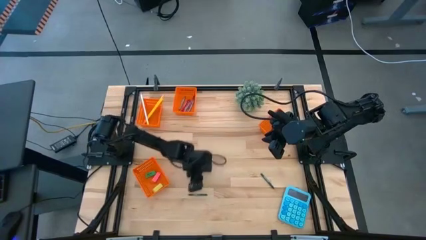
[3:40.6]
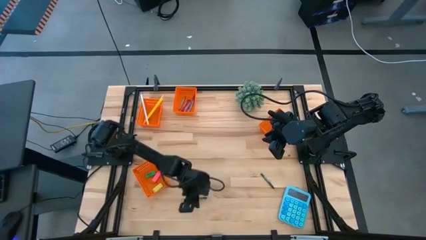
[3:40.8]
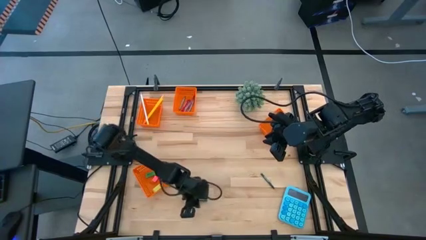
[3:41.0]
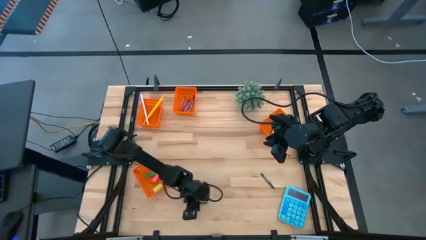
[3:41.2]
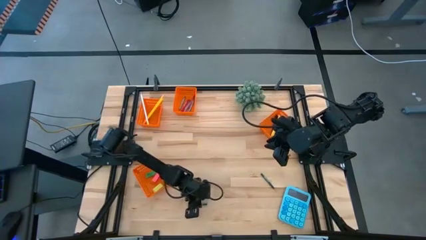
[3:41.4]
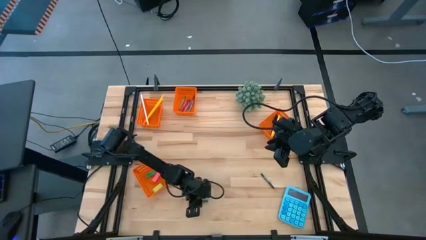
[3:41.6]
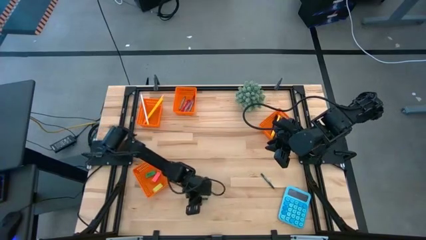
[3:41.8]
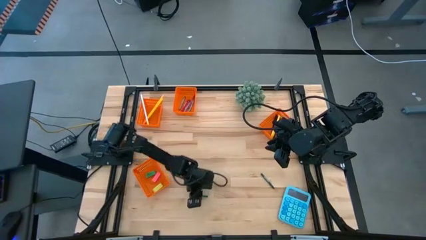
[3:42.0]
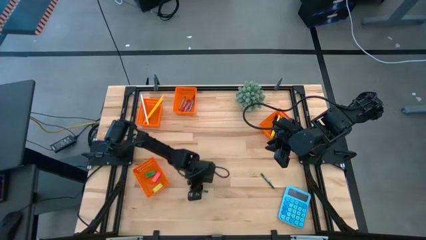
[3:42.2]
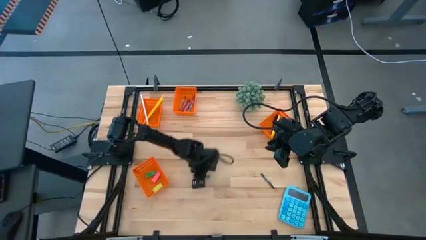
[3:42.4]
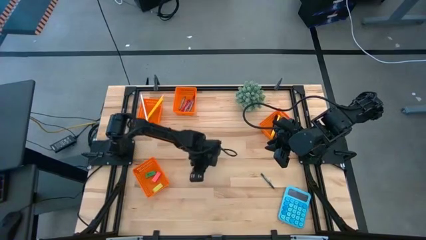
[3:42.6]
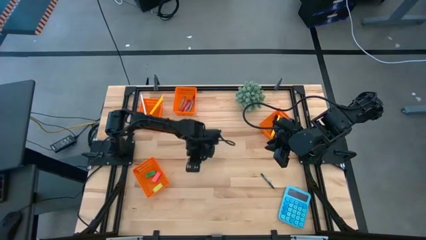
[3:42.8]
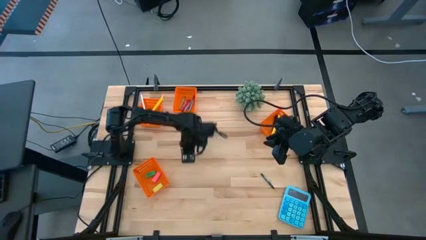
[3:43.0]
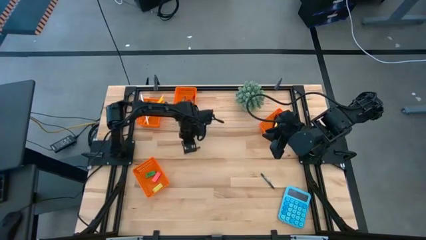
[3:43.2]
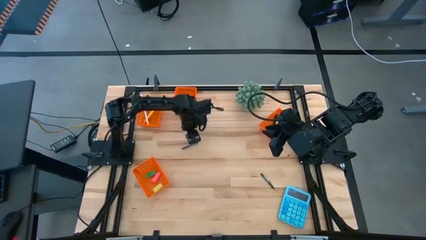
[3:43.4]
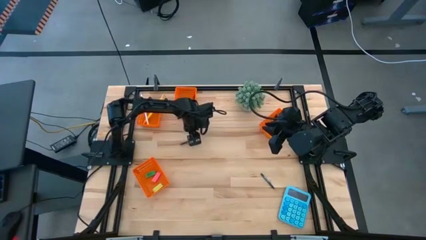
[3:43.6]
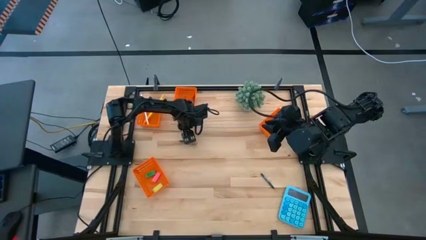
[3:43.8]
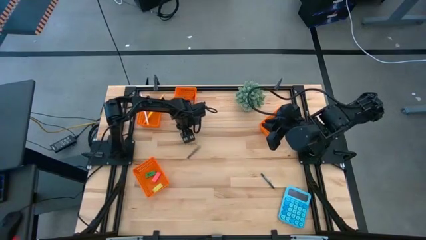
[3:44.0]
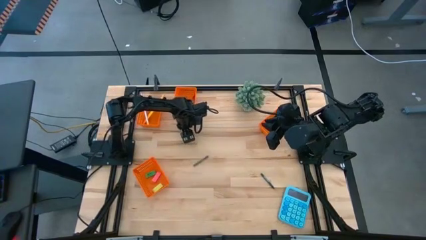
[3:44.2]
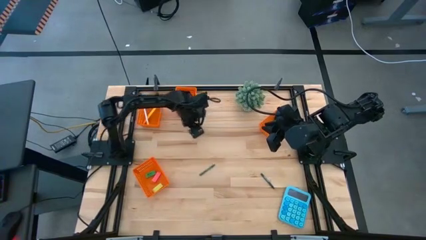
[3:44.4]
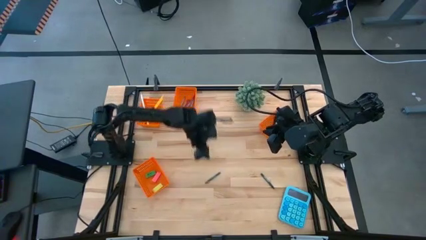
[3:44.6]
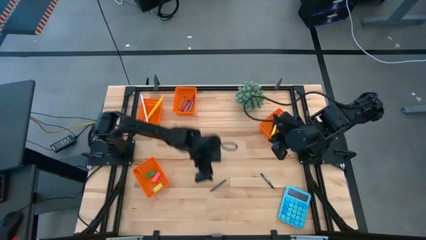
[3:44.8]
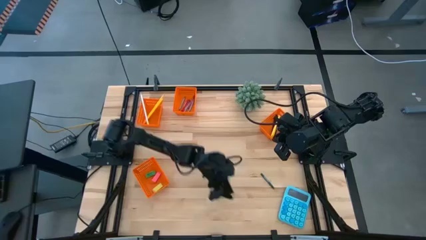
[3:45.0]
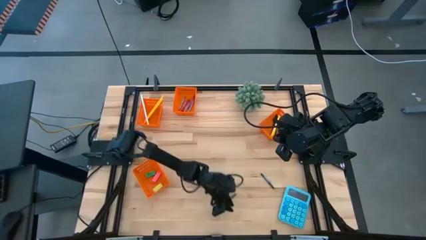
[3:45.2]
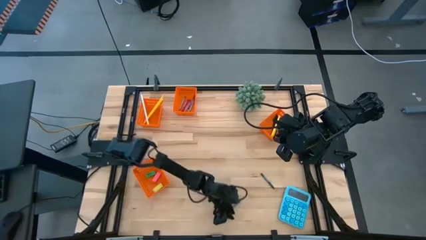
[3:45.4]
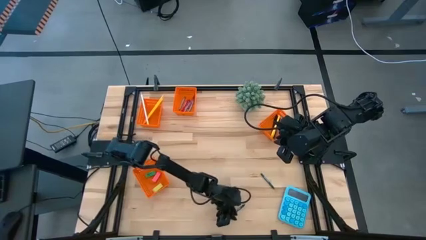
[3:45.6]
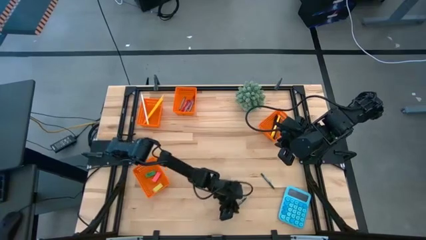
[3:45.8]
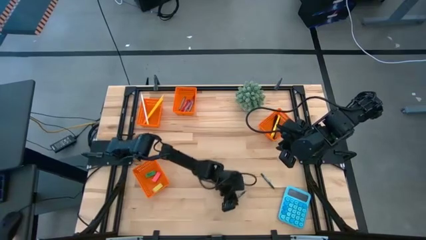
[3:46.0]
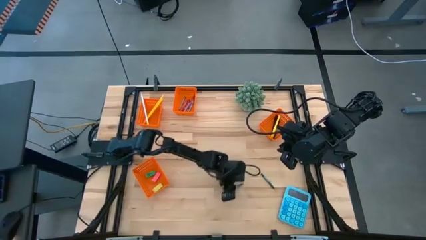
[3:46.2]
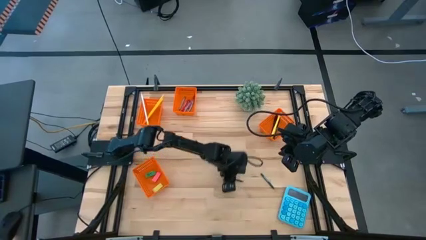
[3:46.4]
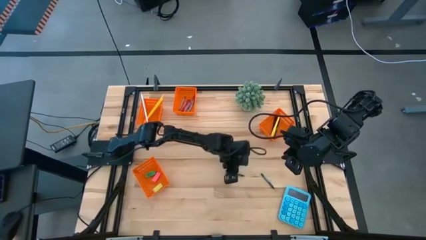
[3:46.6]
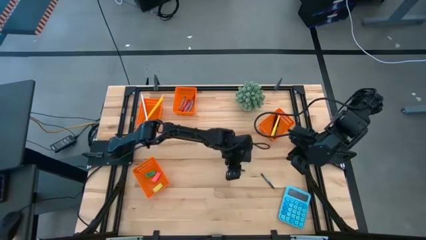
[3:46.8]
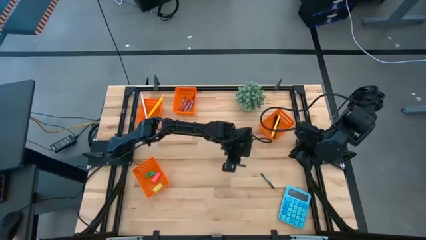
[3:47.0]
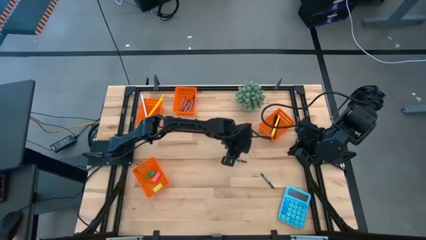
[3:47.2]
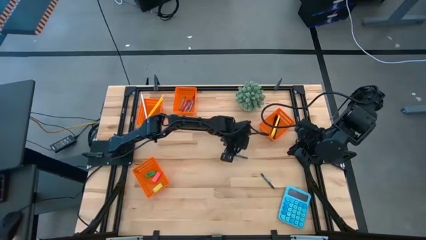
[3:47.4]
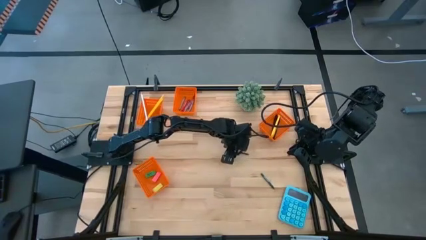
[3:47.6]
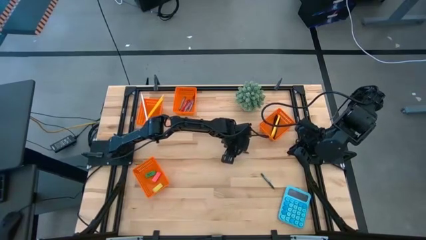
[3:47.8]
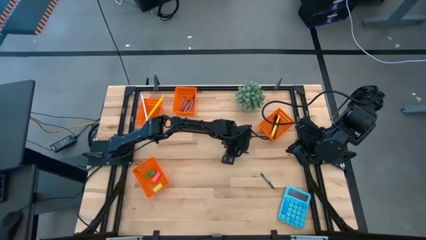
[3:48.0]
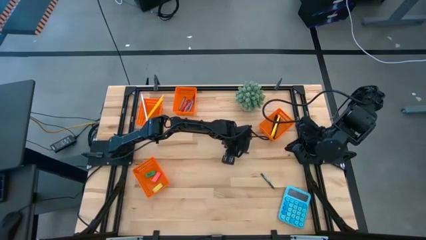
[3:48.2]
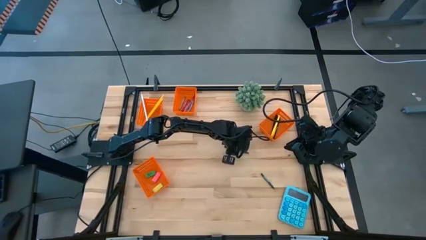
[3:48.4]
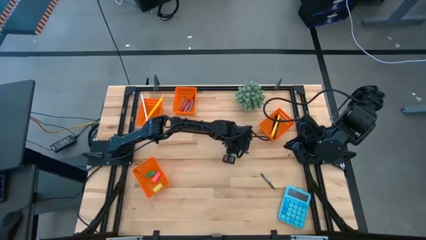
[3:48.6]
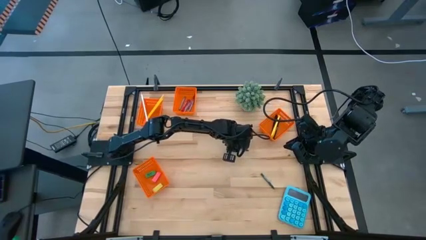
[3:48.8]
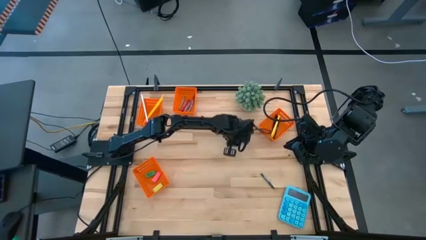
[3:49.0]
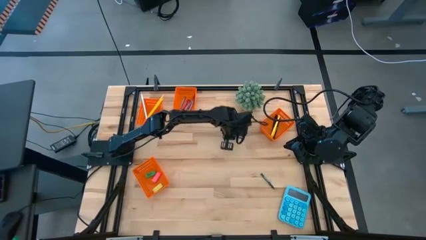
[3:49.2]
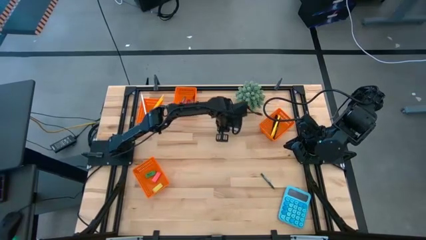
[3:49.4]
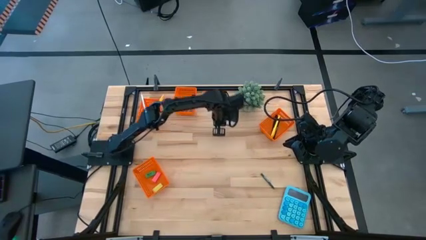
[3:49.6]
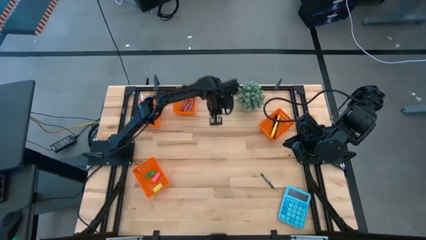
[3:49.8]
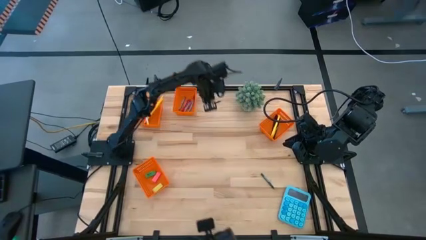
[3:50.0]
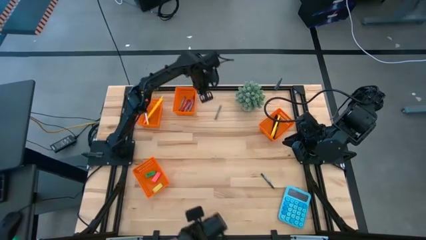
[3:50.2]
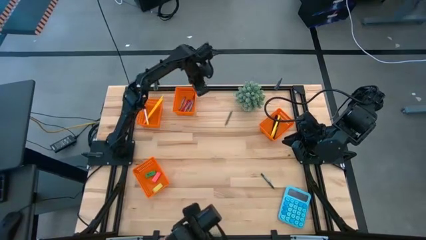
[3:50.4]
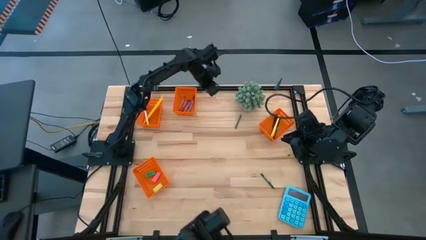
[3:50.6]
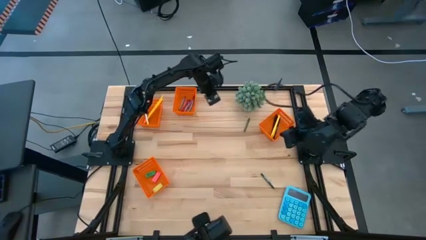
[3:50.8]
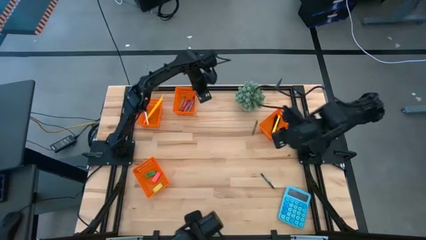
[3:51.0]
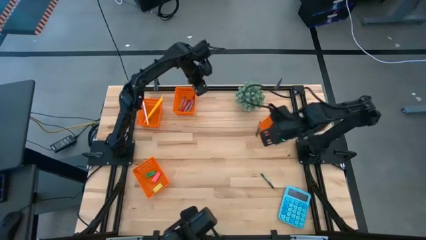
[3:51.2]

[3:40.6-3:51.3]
Task: Sort crayons/erasers/pens/pencils in bins
Put the left green crayon into the middle orange bin
